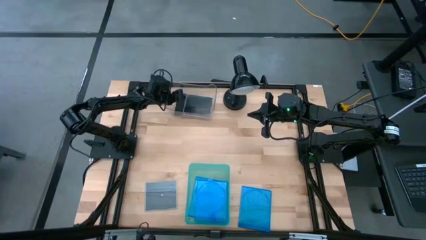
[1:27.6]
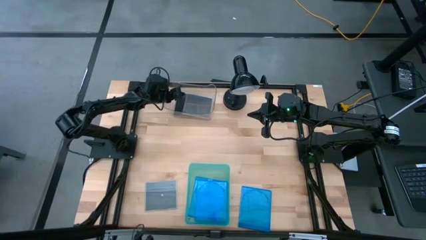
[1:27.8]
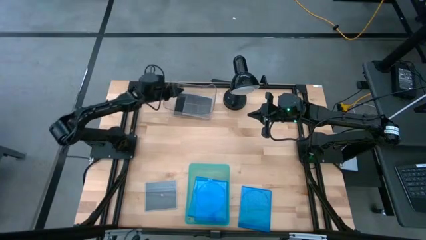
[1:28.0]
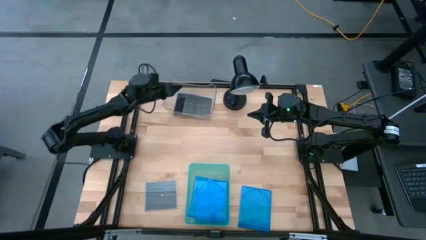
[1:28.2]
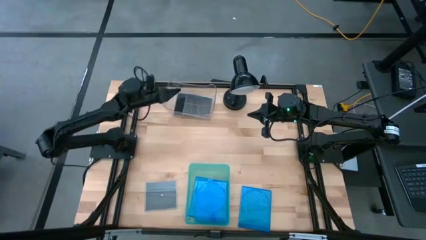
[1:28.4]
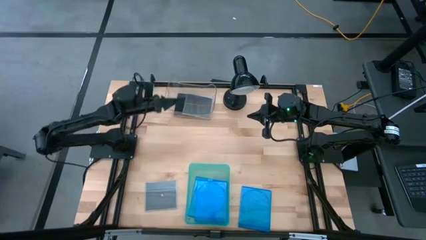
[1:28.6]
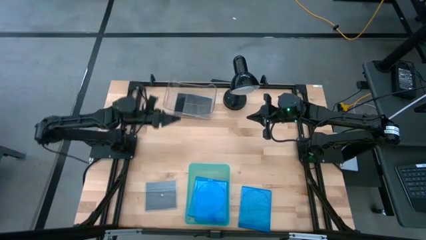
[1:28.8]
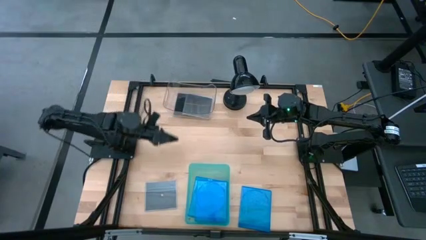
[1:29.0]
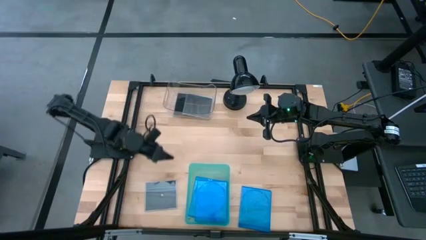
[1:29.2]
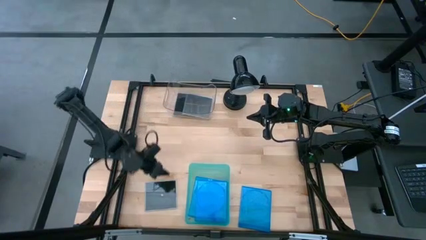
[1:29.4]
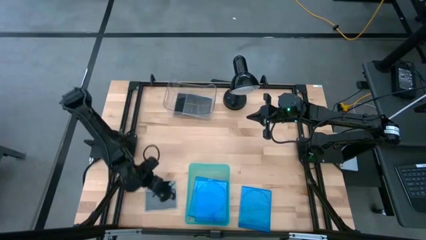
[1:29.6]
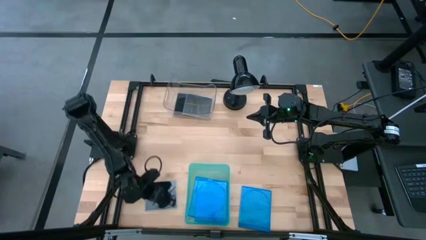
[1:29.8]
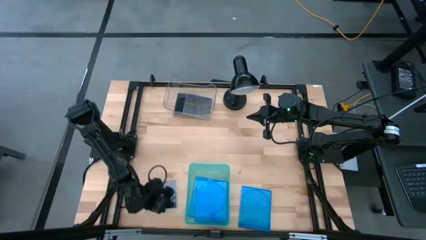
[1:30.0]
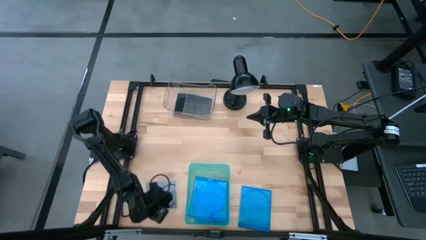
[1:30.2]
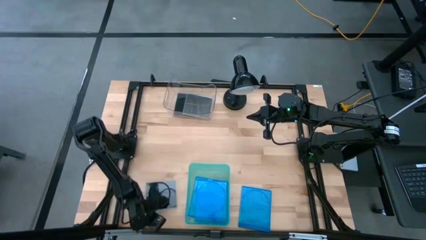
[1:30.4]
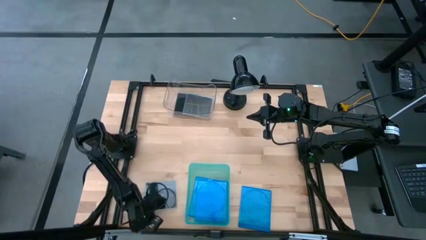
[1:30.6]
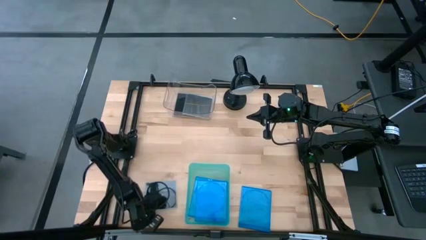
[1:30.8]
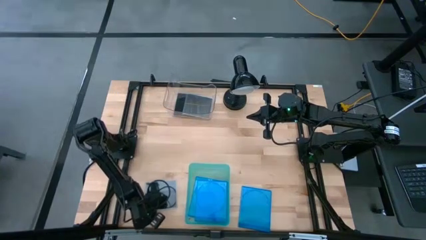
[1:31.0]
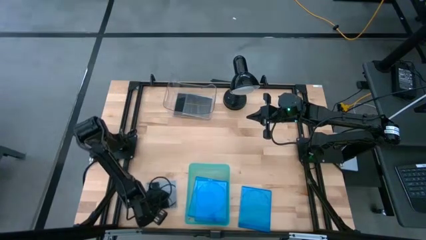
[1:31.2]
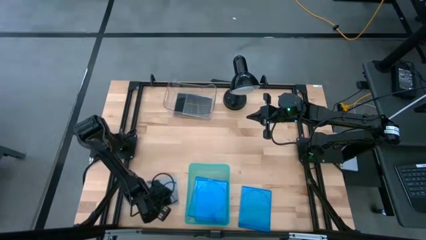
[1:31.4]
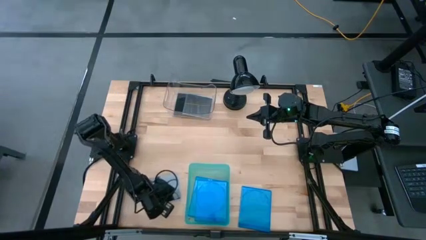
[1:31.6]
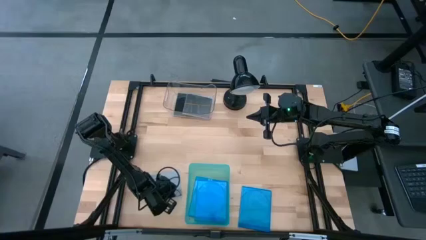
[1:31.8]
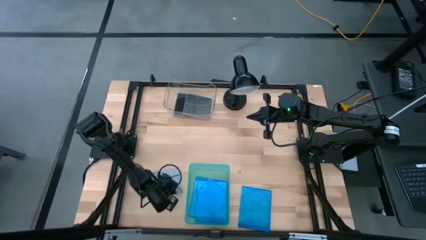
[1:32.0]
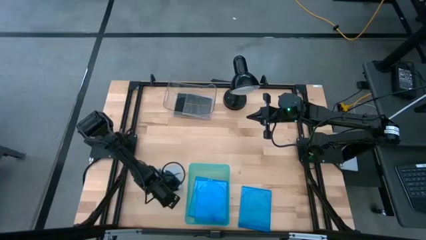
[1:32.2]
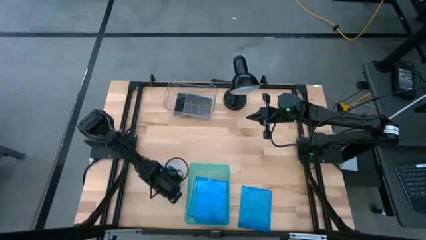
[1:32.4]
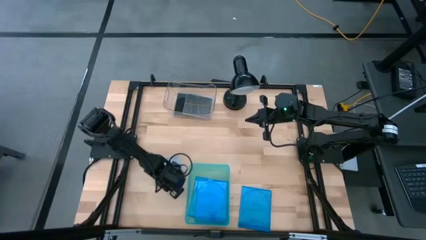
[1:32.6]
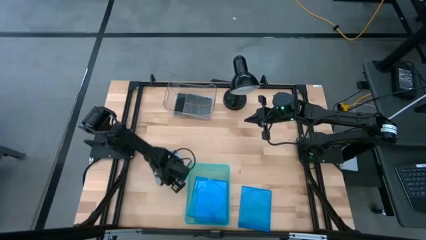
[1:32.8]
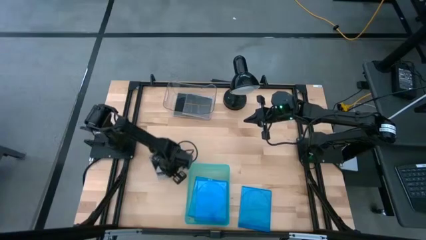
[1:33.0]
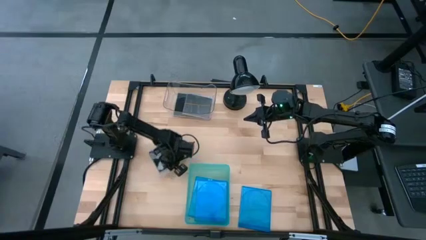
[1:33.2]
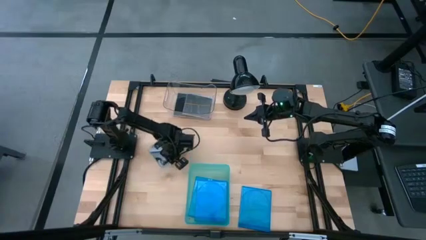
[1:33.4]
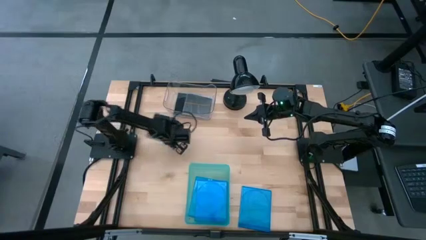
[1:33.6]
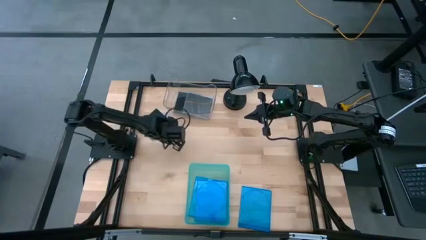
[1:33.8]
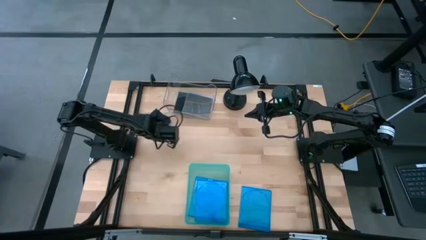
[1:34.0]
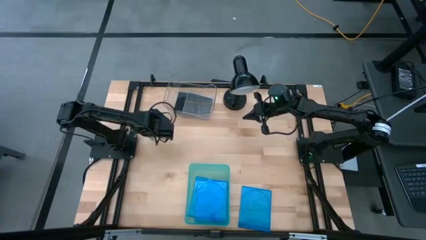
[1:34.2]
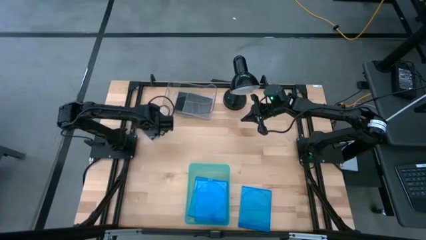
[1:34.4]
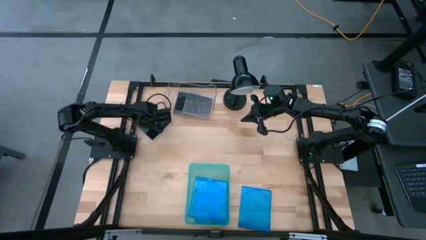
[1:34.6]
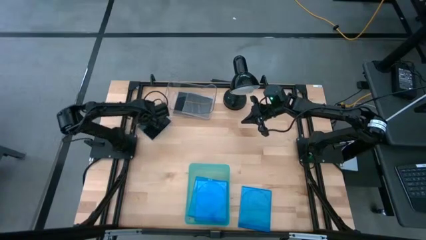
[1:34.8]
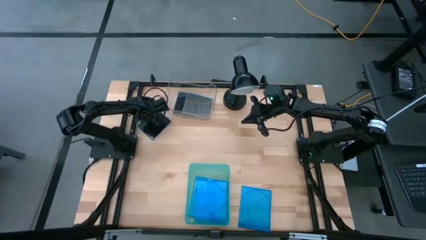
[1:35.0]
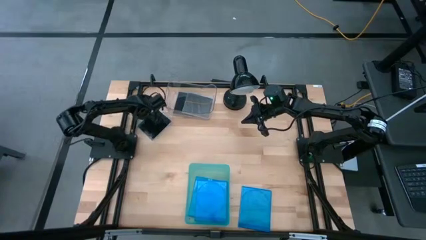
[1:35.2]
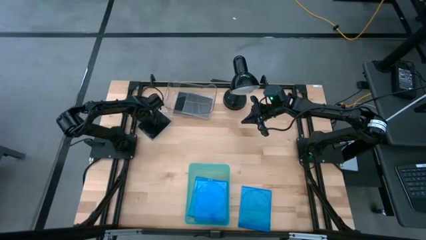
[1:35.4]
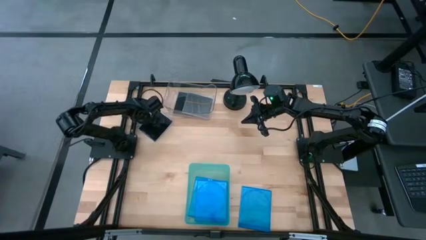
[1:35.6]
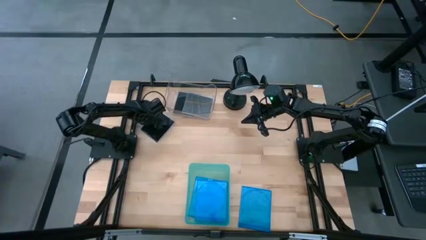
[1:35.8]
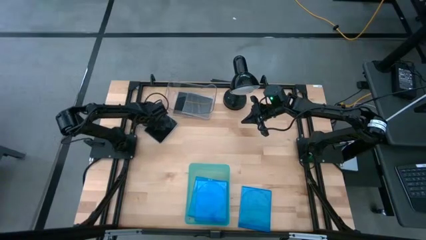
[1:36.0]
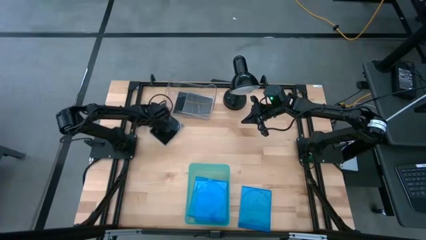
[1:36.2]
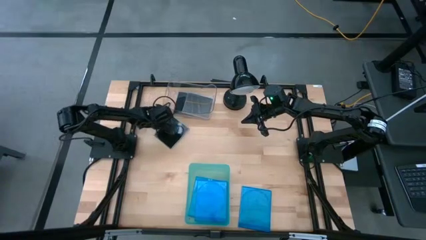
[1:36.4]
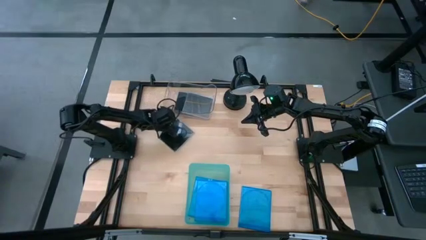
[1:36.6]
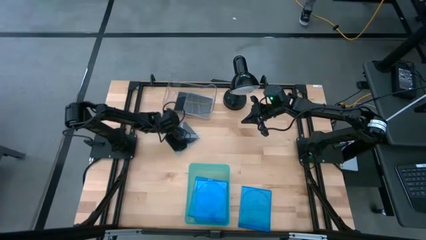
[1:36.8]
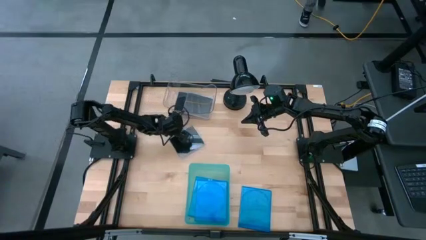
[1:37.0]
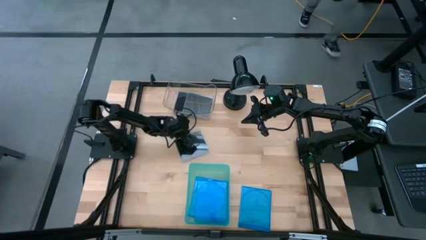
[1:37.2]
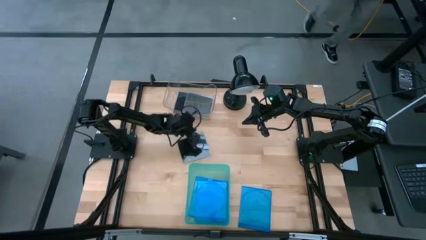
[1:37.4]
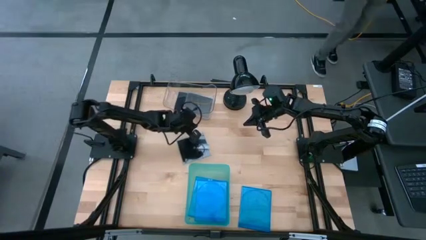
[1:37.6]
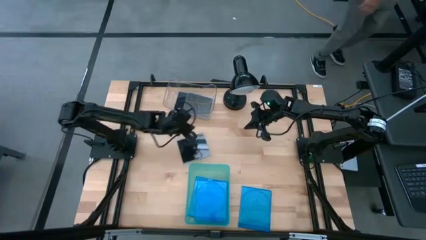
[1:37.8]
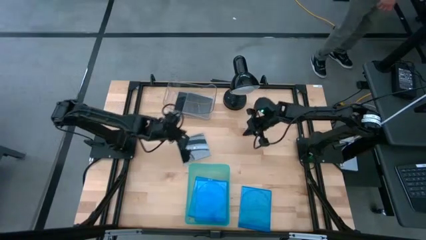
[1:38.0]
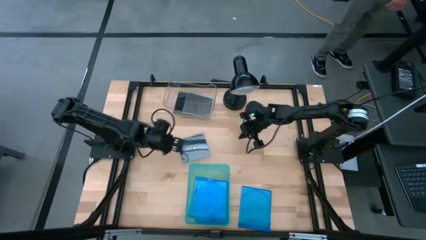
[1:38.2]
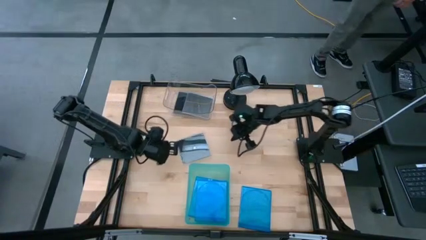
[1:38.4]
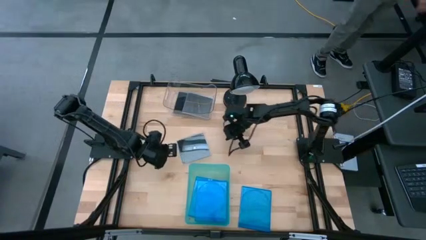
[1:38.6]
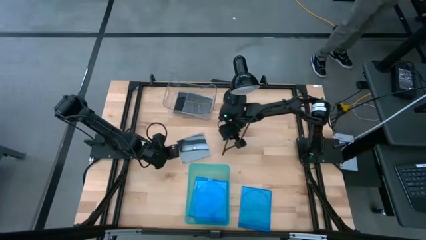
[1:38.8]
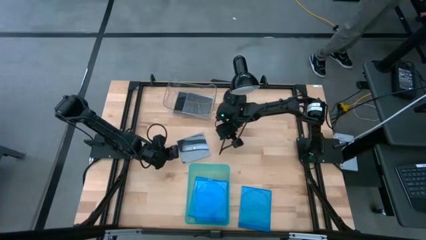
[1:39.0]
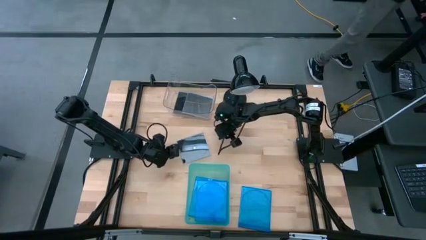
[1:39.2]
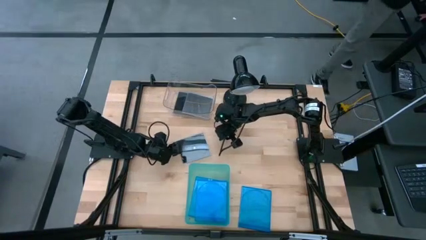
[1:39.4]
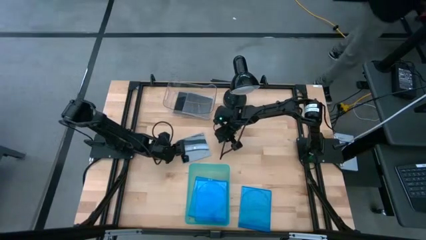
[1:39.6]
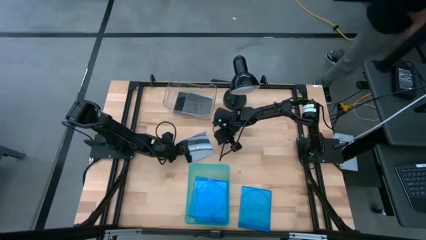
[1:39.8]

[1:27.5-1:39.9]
Task: Pick & place jewel cases by type
Put the black CD case into the transparent bin
